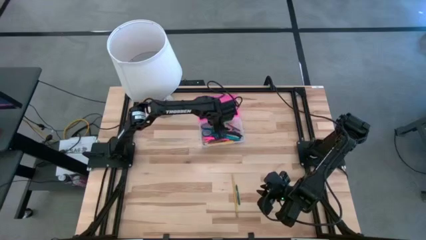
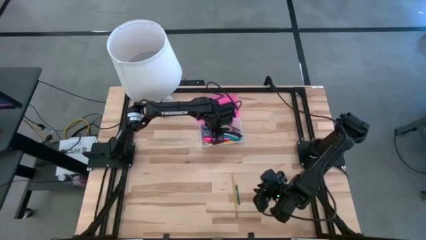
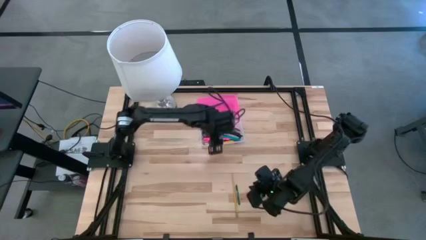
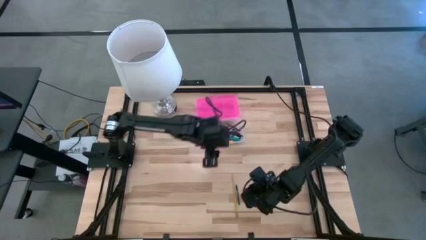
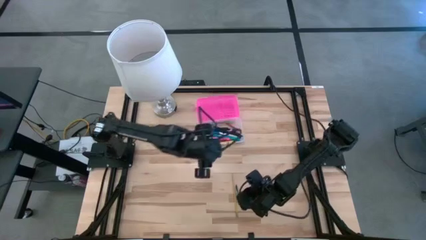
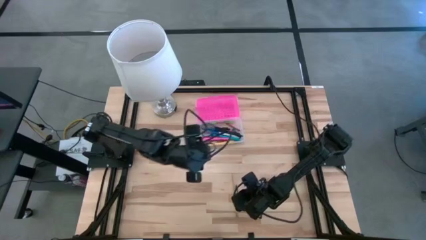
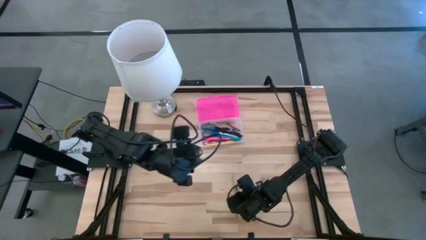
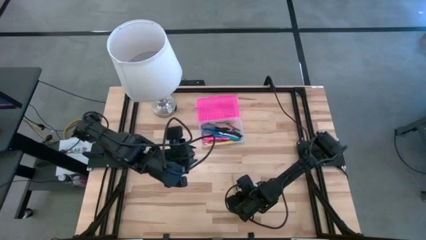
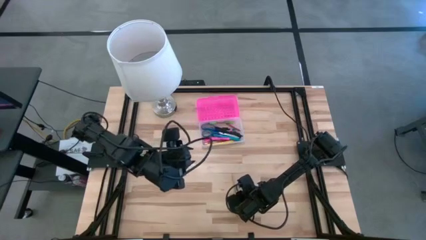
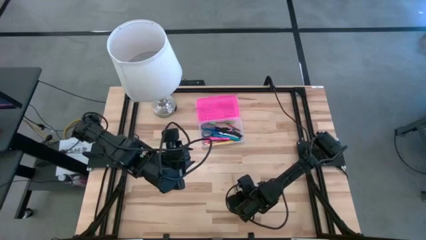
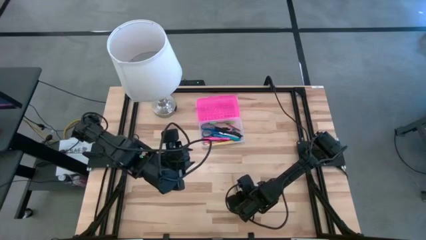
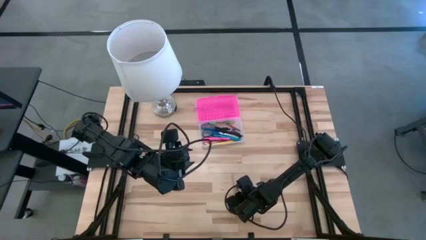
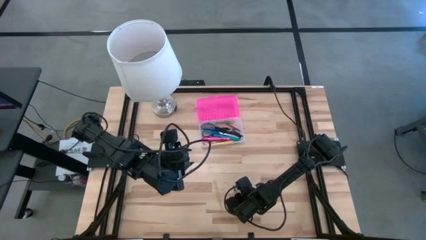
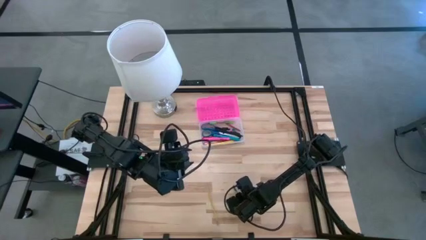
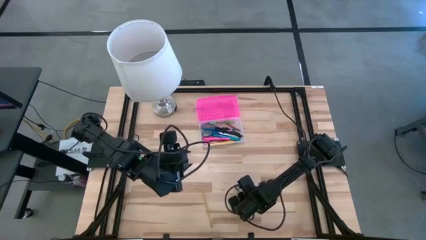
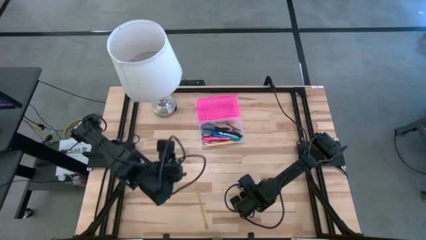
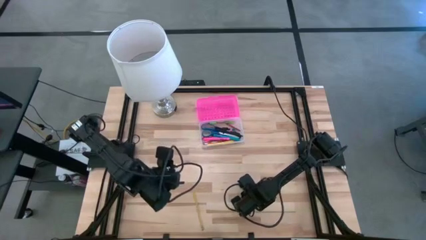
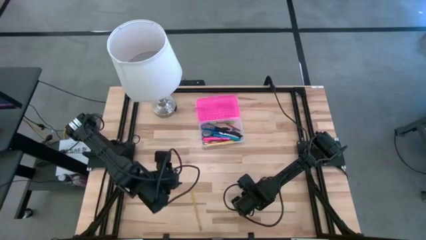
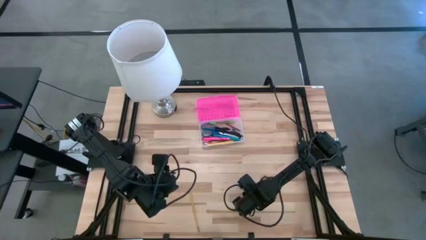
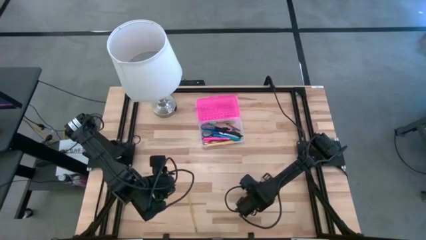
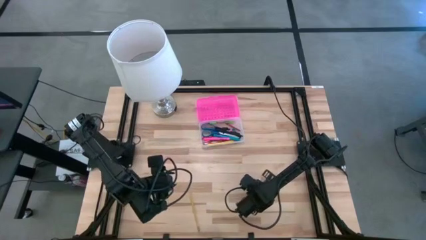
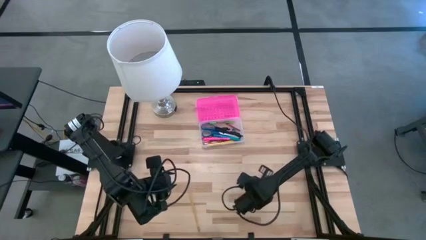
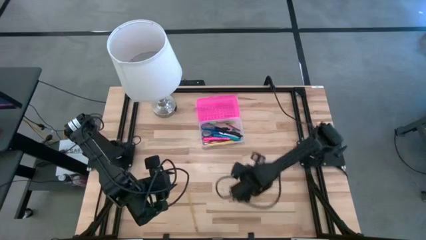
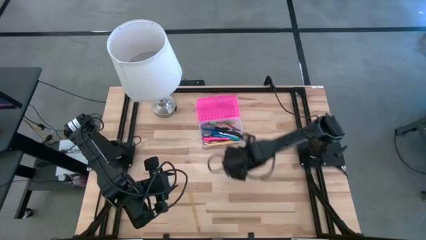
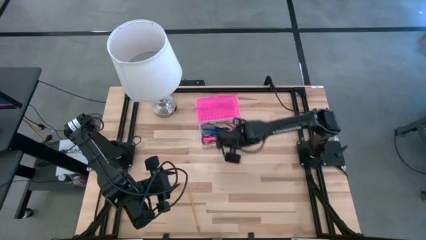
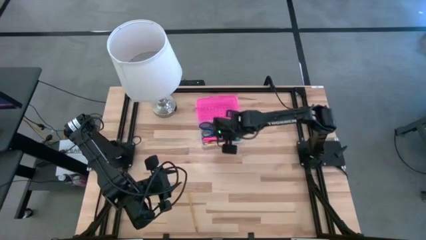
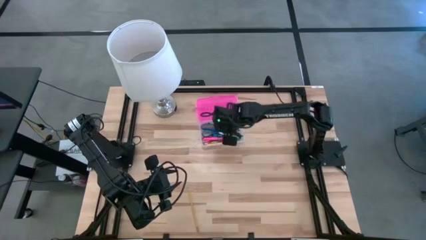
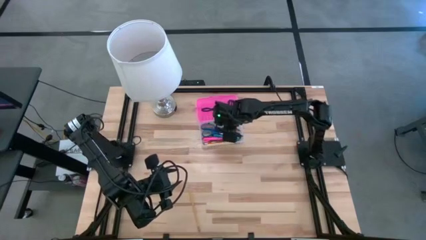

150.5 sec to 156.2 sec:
Task: Pick & place school supplies into a supply box
Put the green crayon into the pink supply box

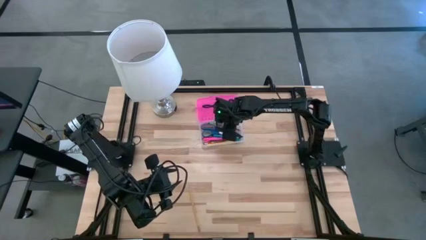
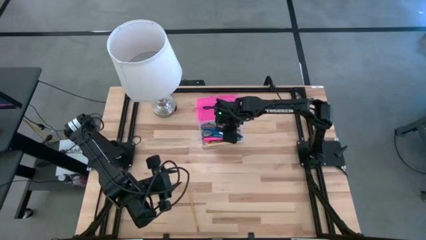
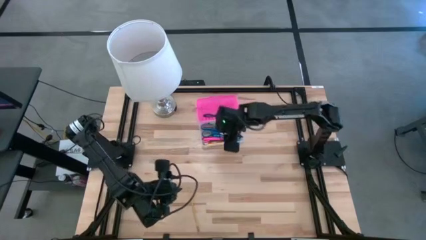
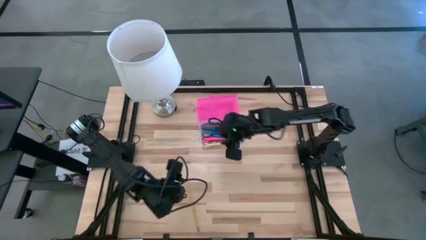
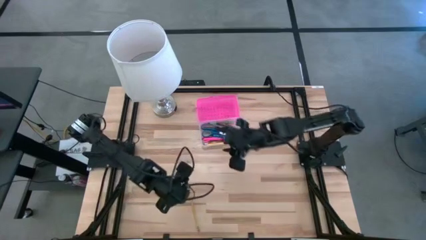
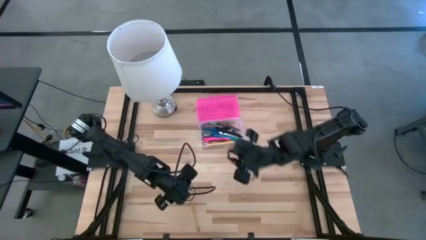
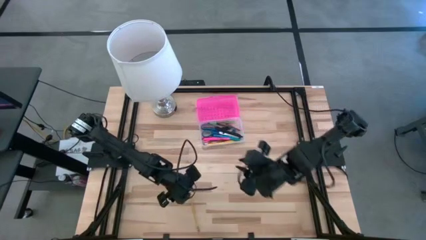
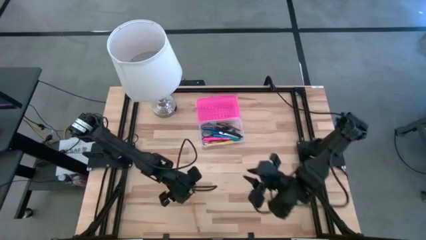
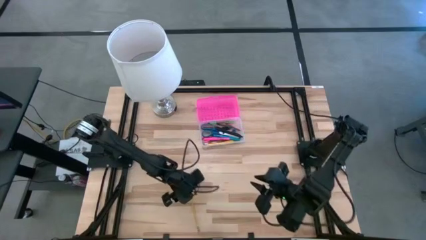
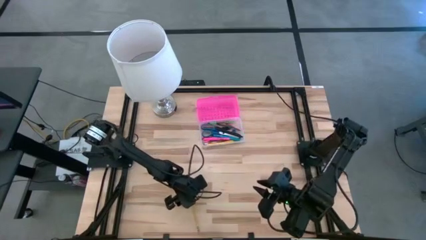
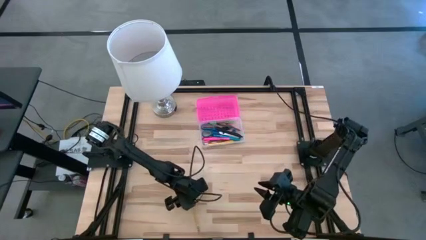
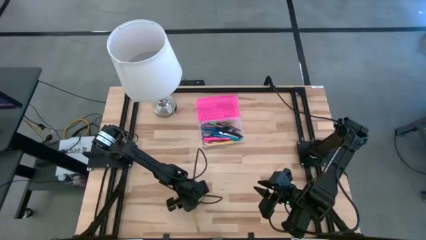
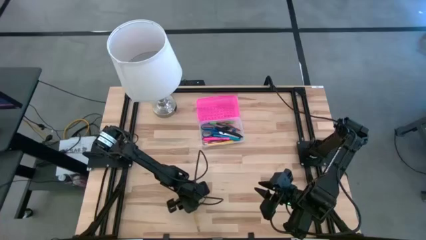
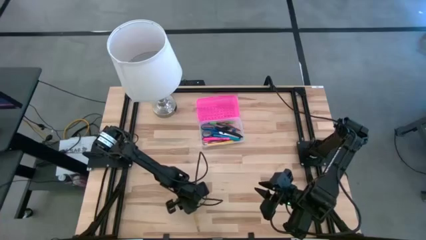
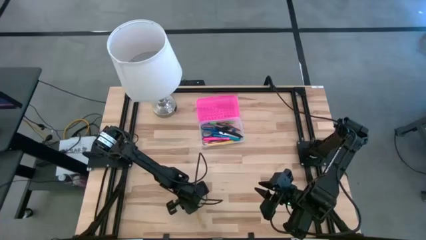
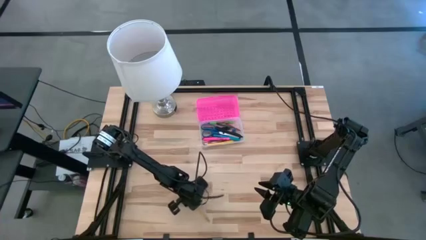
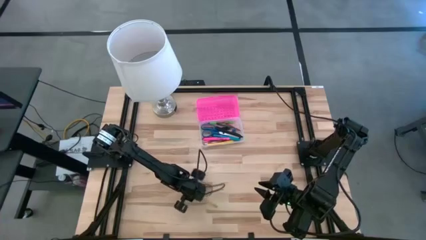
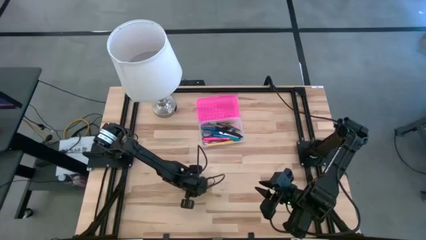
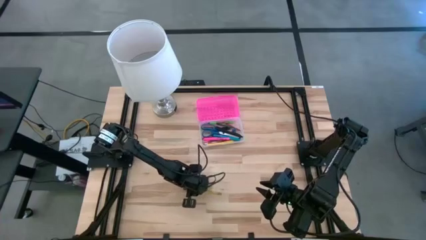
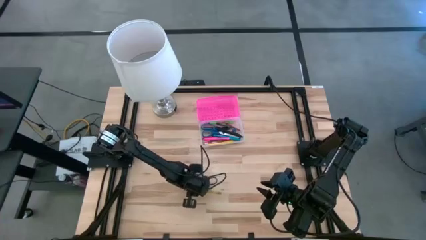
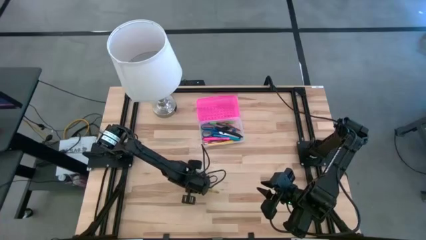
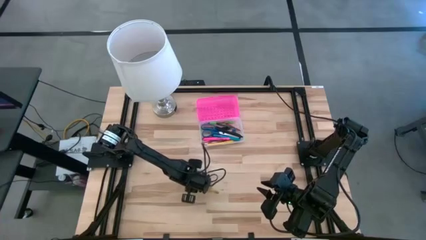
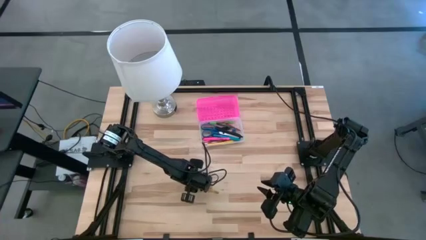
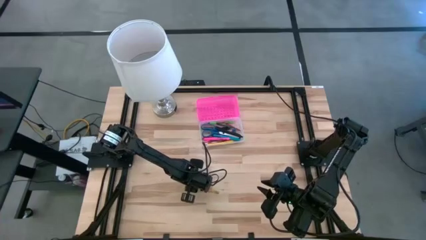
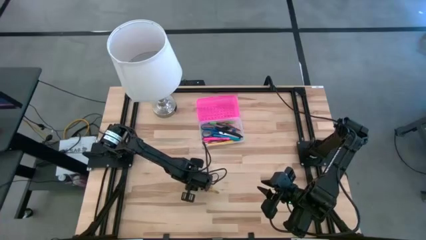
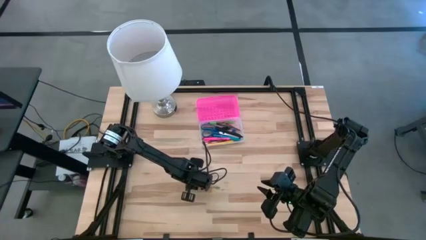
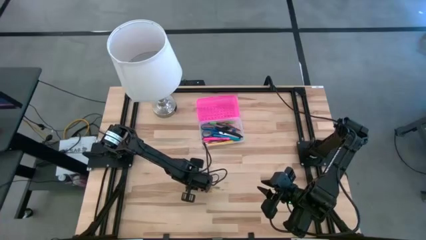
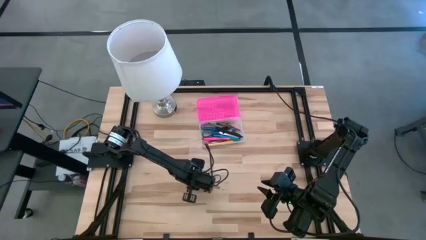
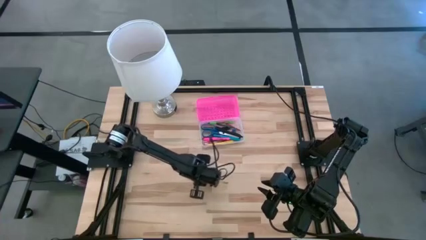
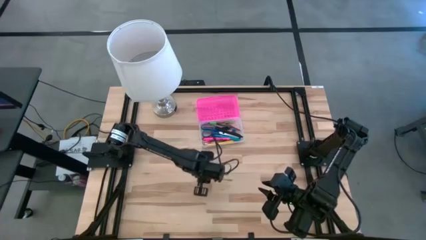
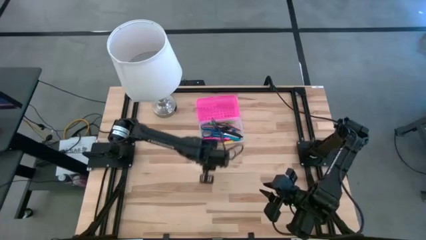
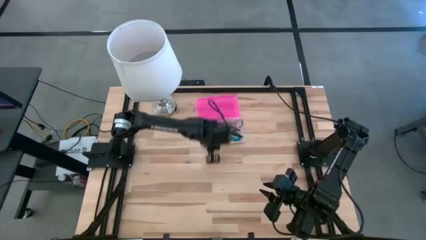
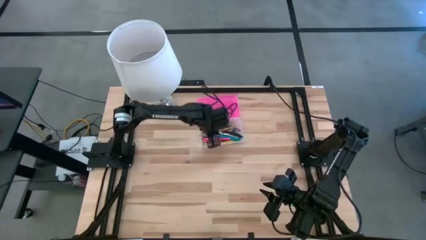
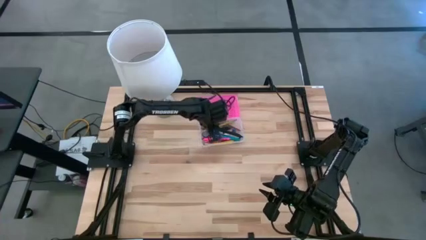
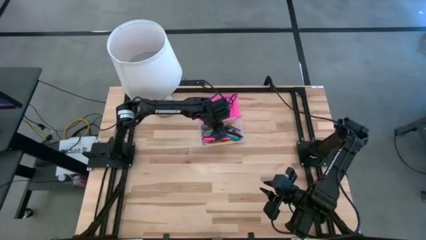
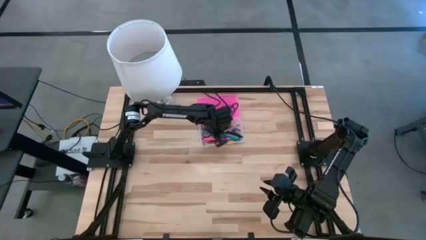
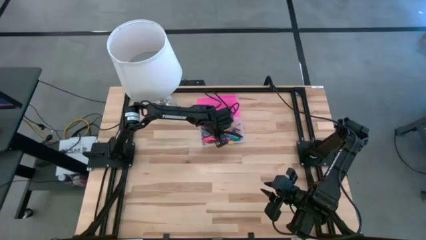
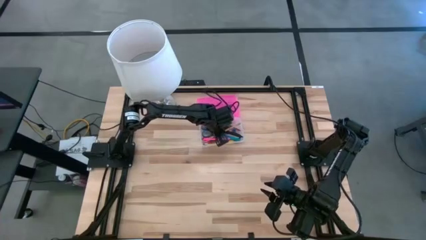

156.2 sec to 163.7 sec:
Put the yellow pencil into the pink supply box
